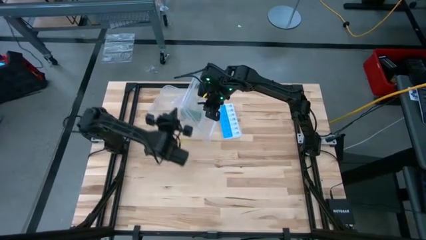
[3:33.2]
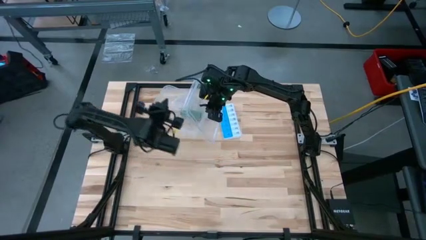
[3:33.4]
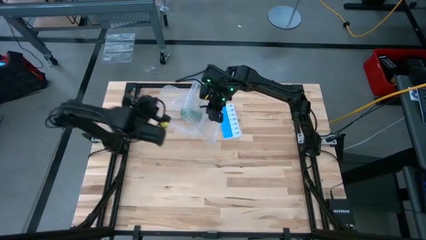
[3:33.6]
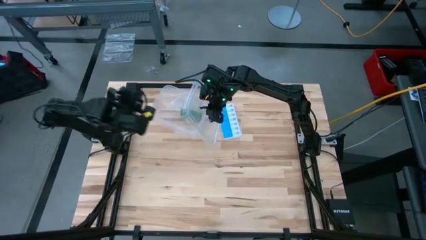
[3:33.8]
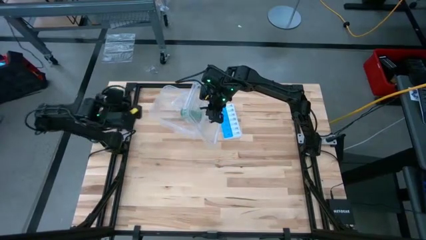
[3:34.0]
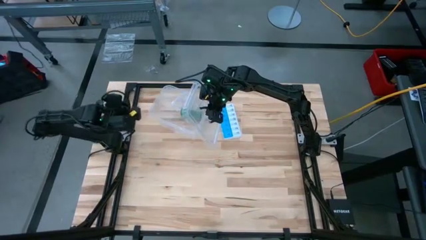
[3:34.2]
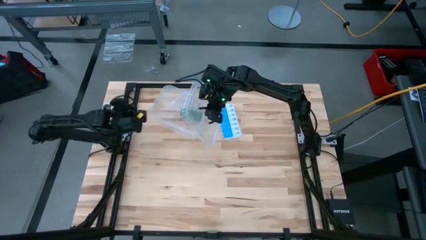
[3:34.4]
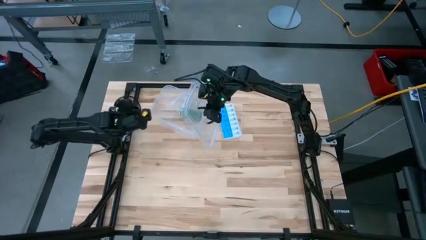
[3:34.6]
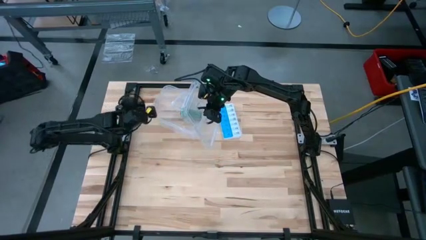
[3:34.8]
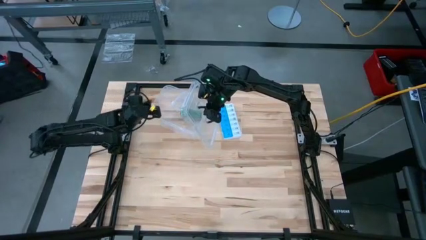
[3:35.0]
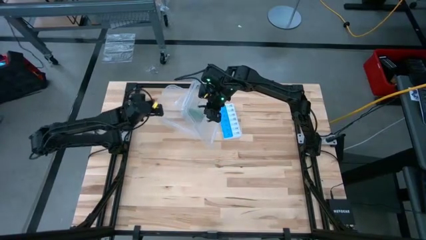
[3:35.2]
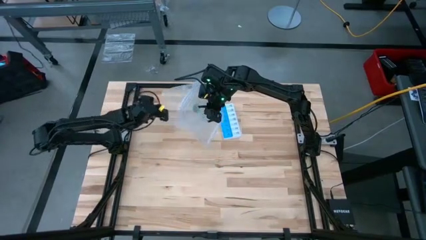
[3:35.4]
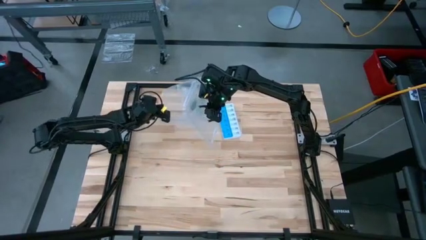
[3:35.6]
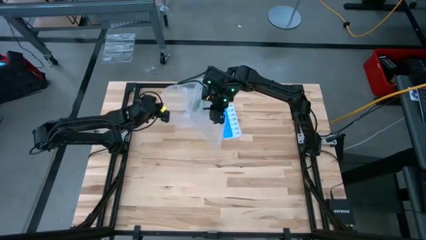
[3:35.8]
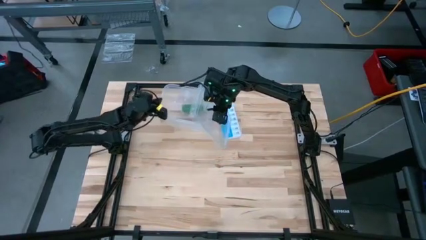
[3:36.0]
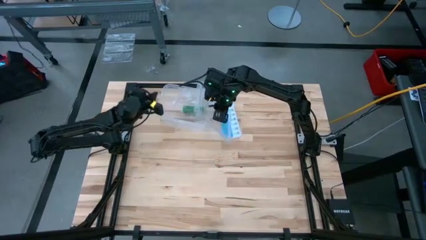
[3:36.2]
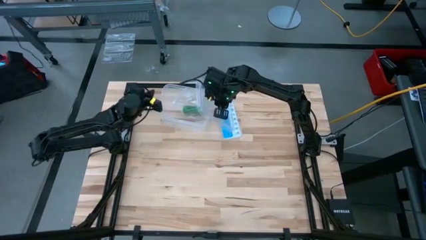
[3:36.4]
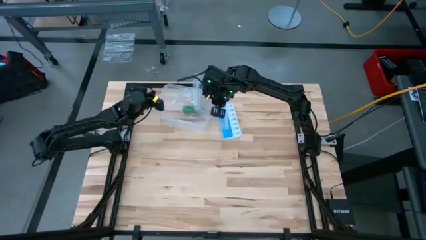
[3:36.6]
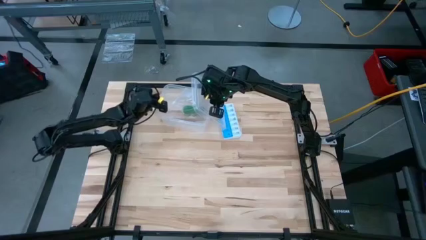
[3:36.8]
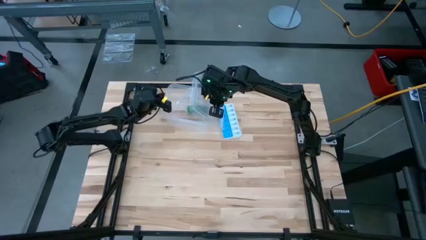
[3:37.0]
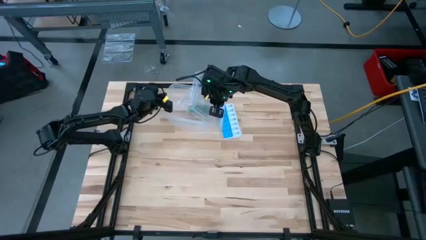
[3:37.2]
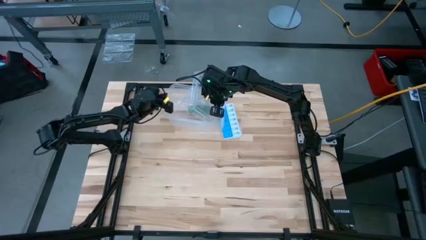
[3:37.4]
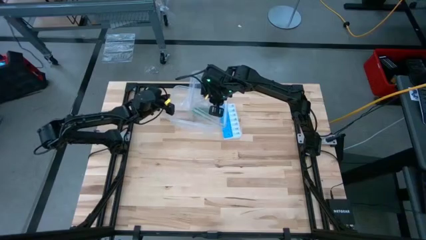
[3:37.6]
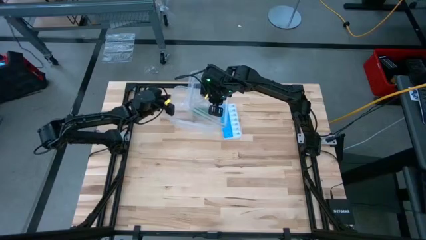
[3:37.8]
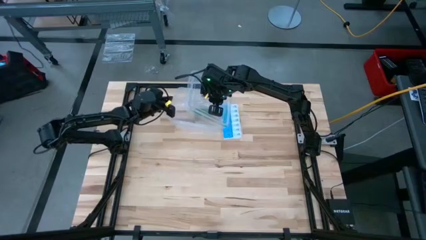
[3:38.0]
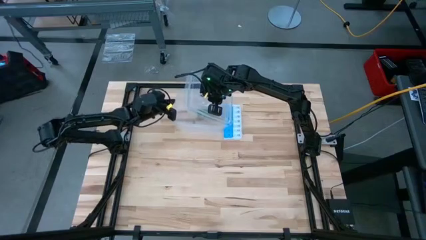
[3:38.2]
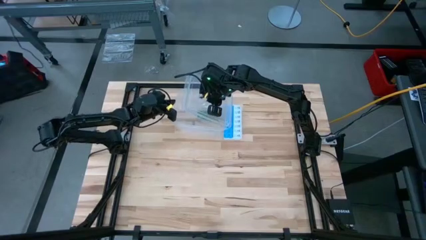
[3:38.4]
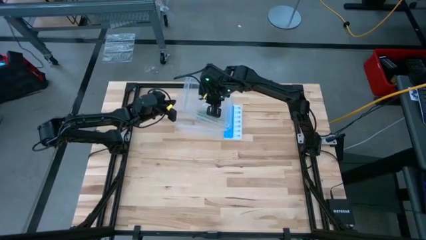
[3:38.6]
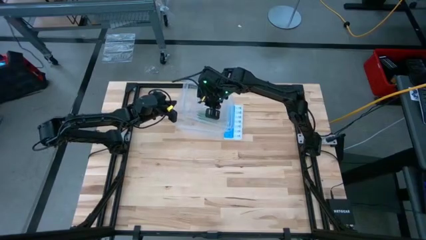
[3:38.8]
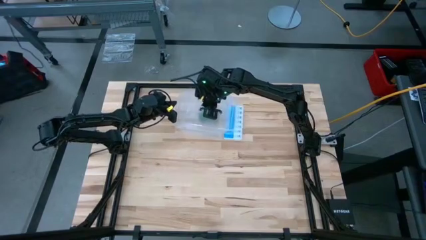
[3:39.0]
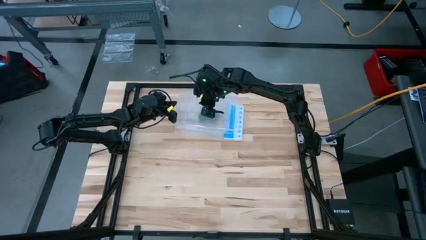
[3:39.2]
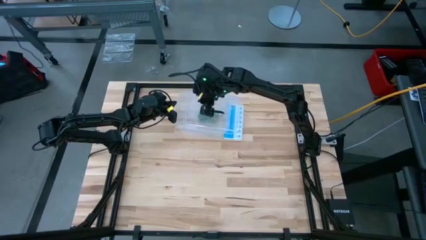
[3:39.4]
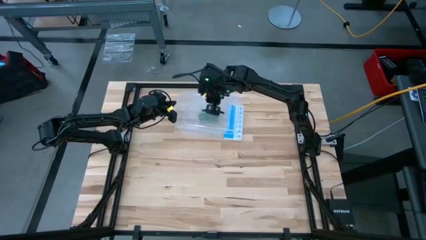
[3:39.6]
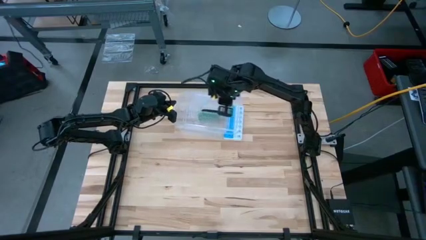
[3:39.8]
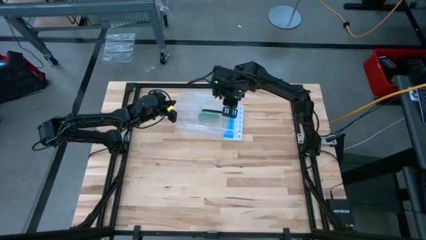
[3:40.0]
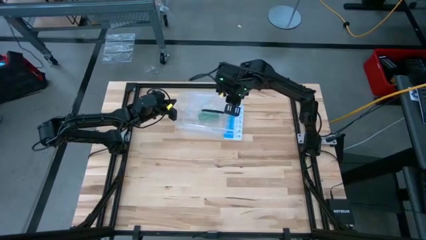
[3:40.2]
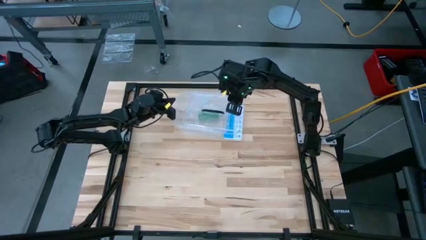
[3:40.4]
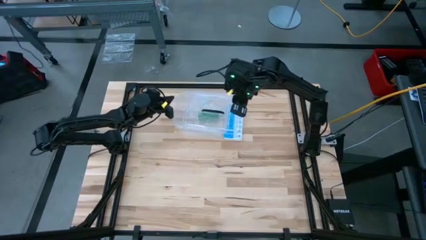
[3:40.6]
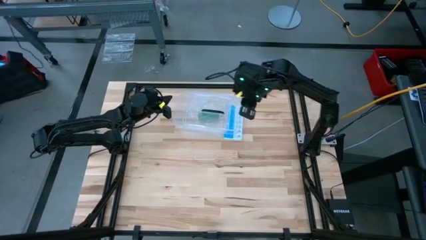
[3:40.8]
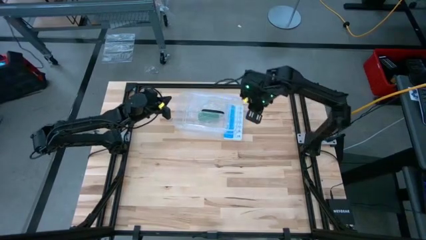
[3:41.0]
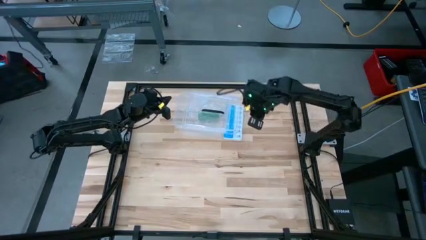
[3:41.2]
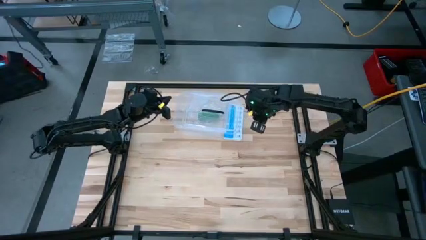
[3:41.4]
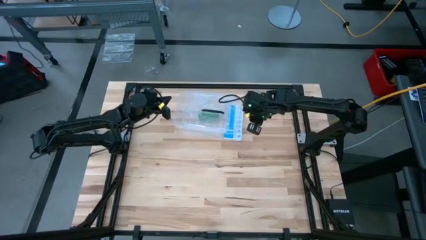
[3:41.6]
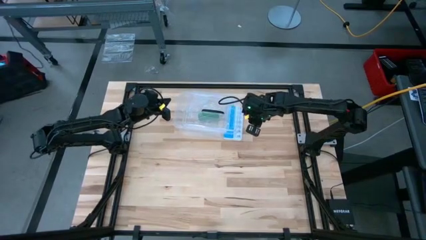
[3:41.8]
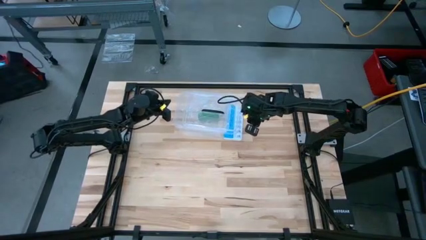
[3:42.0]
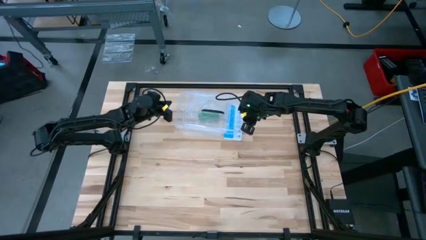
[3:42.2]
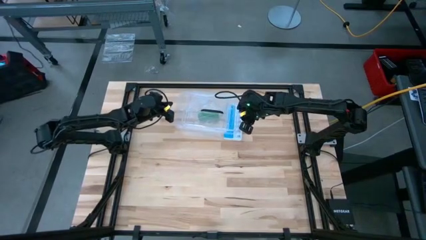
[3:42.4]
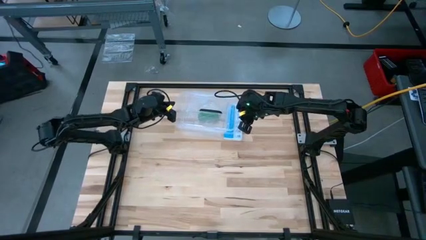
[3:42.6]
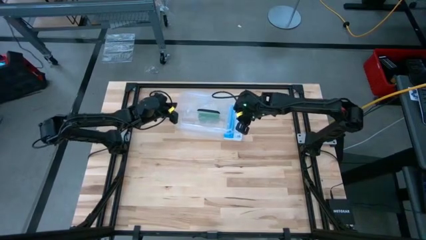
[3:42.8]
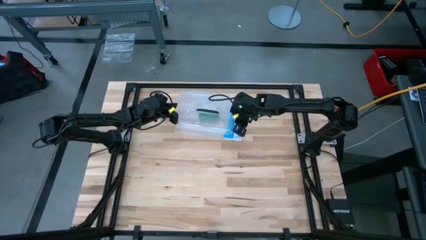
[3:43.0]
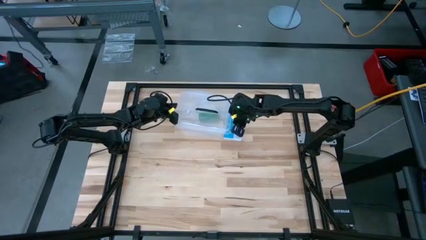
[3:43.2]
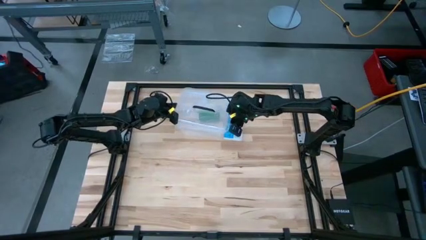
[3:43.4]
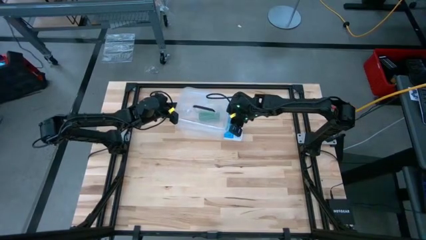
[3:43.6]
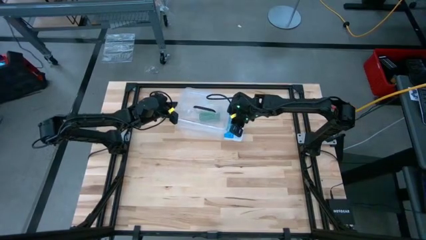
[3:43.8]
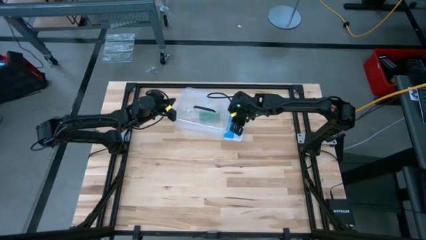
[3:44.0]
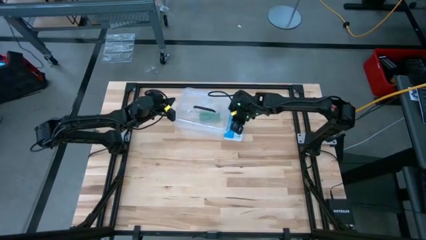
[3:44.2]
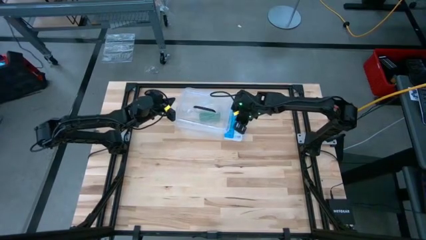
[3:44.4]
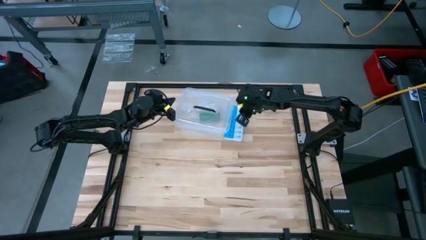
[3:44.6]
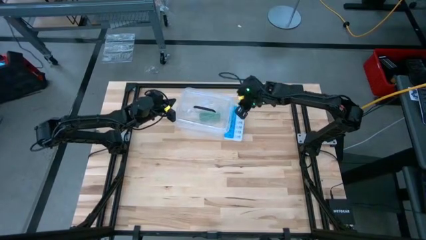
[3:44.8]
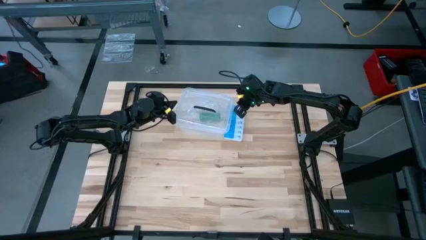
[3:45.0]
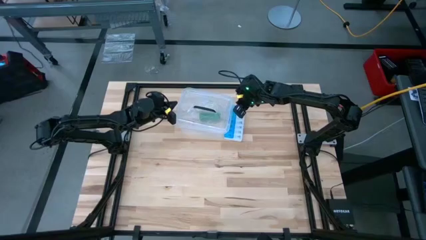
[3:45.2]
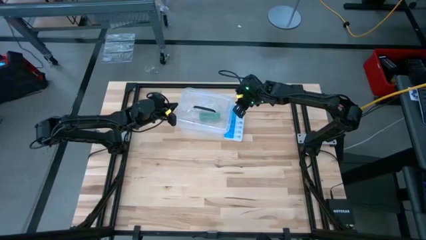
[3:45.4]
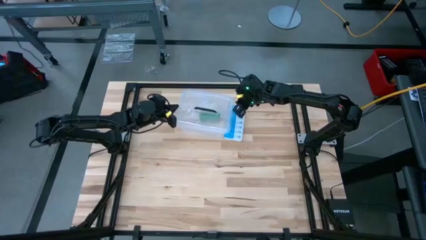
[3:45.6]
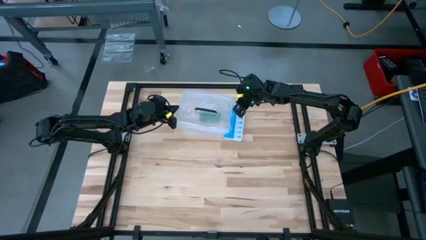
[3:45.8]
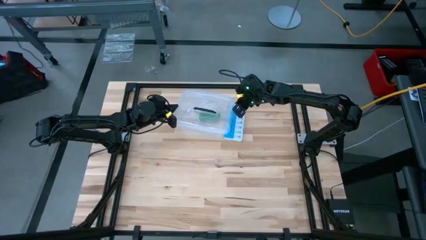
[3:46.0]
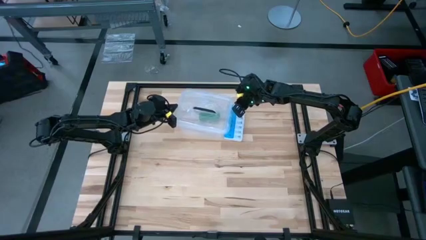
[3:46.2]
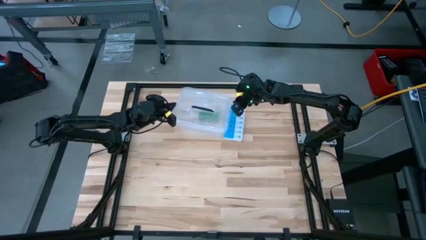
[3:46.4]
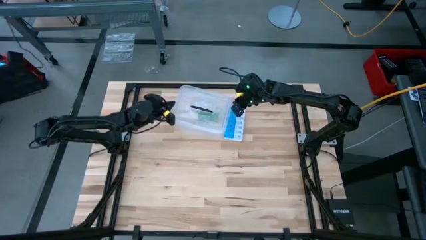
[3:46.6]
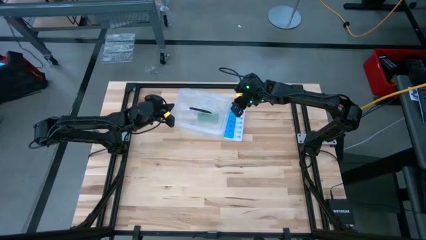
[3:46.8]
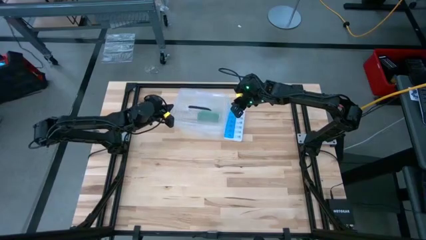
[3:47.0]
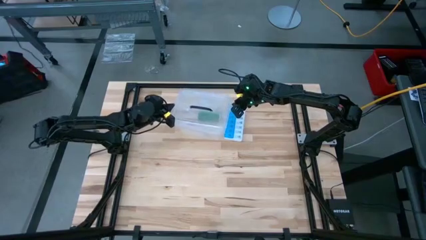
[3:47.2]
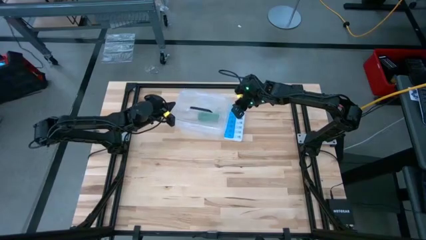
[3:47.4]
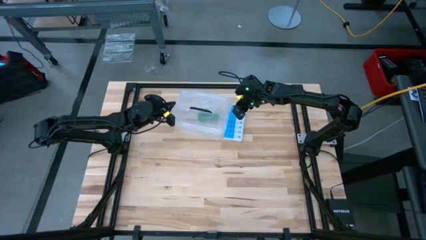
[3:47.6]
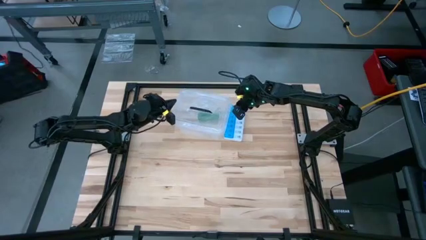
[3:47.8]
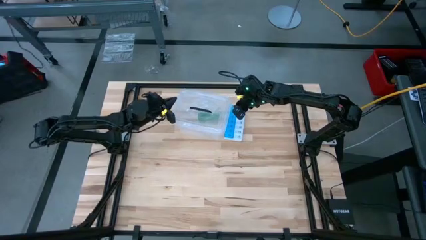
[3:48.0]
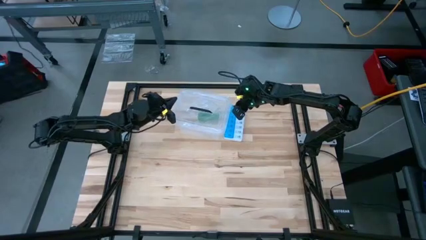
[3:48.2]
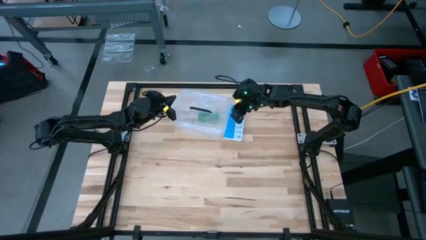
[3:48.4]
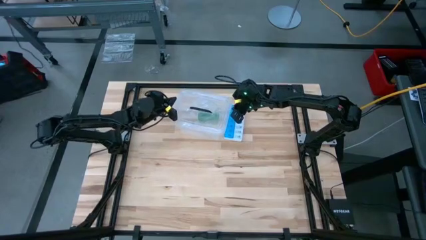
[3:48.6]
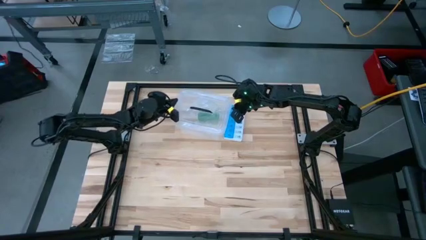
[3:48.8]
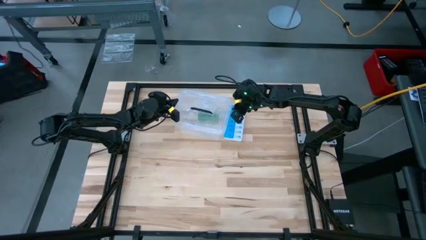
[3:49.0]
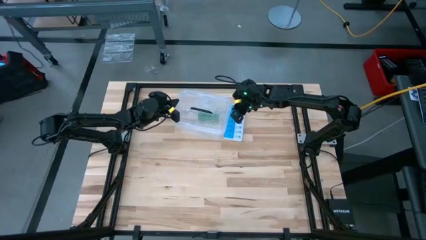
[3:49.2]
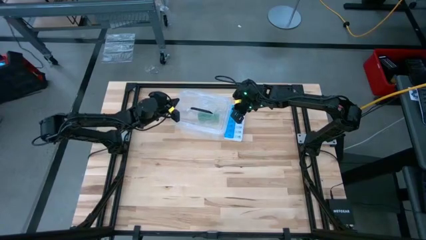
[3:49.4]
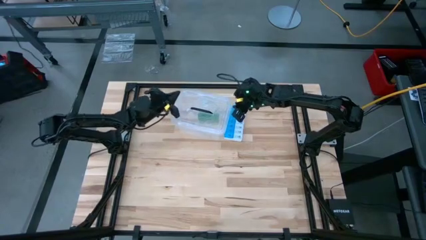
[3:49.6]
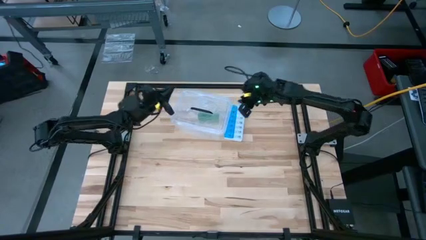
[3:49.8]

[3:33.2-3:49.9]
Task: Roll bandage
Close the transparent bin
